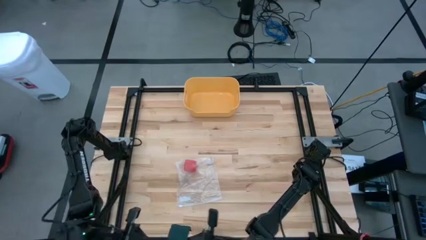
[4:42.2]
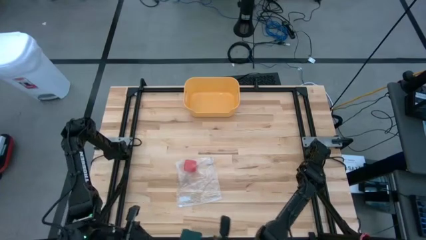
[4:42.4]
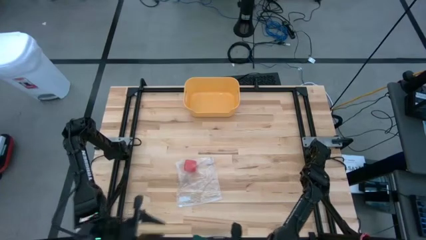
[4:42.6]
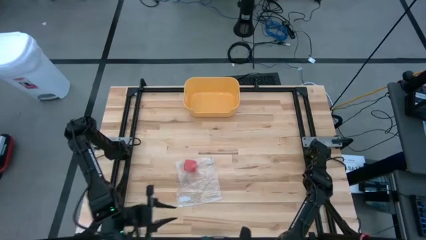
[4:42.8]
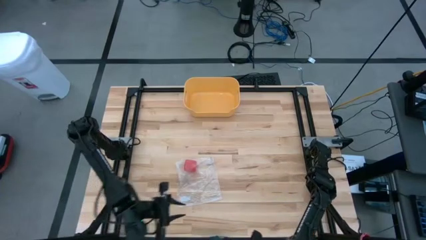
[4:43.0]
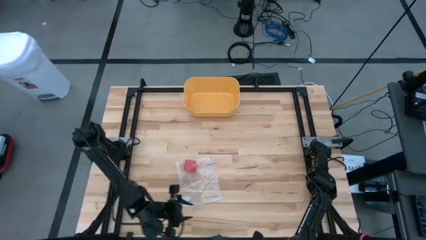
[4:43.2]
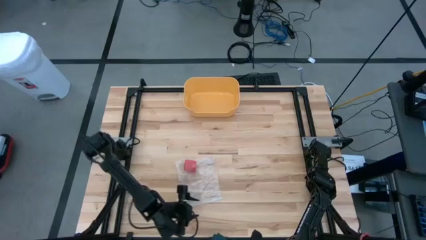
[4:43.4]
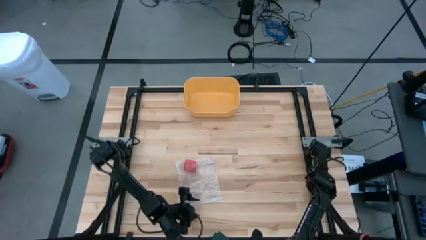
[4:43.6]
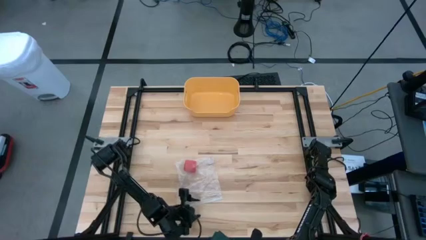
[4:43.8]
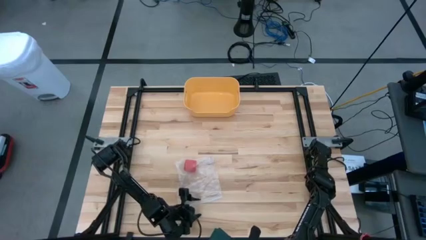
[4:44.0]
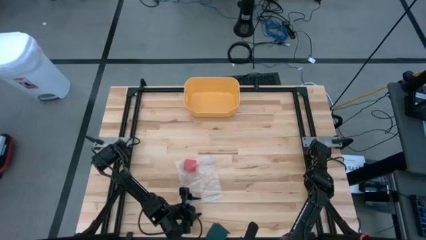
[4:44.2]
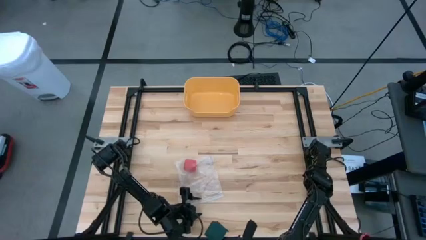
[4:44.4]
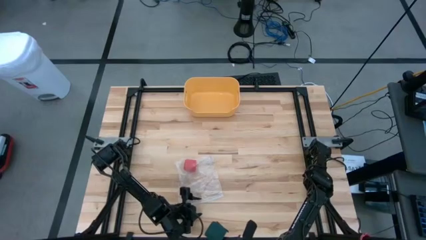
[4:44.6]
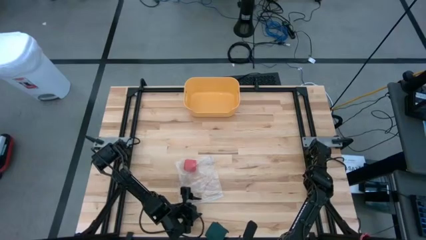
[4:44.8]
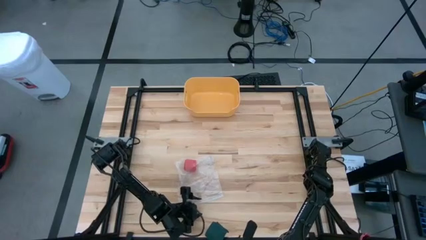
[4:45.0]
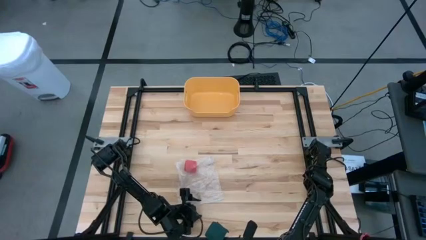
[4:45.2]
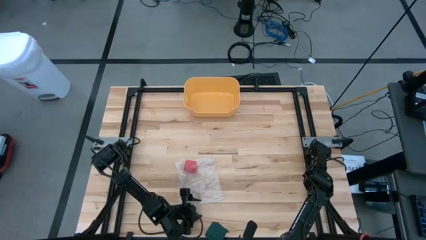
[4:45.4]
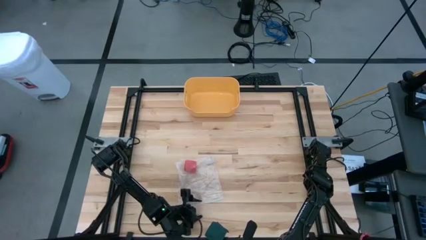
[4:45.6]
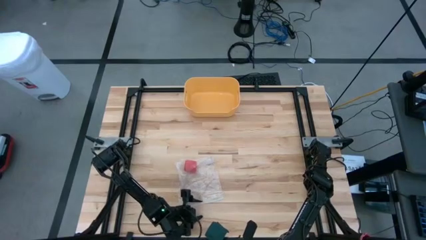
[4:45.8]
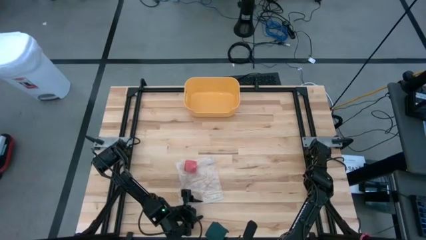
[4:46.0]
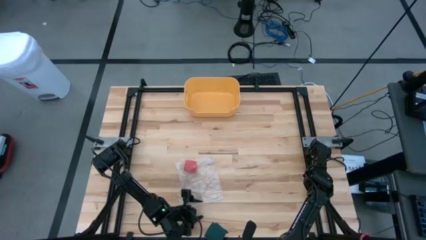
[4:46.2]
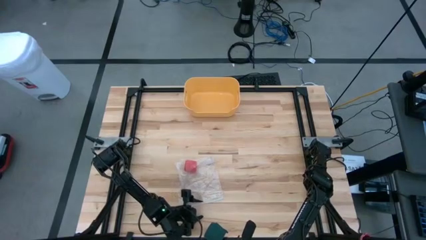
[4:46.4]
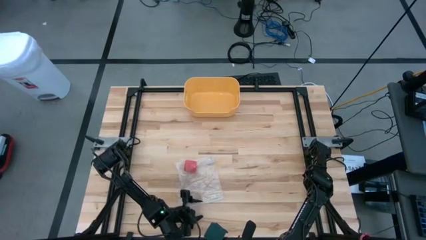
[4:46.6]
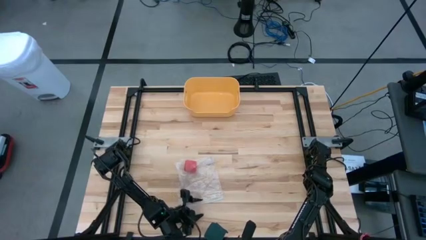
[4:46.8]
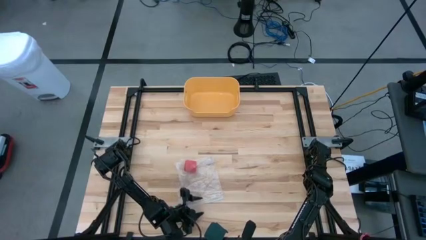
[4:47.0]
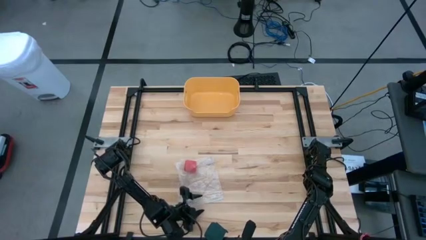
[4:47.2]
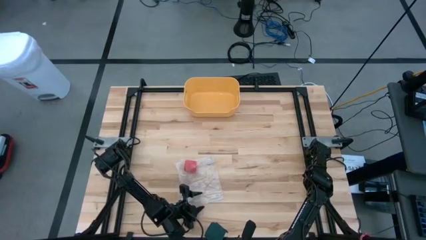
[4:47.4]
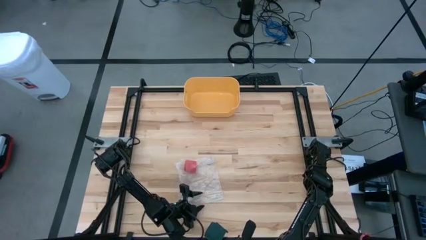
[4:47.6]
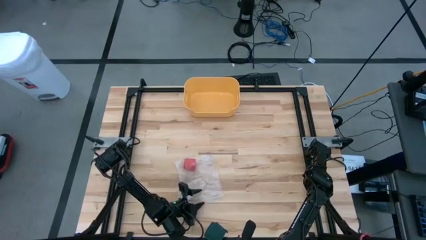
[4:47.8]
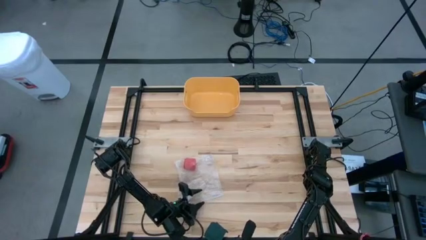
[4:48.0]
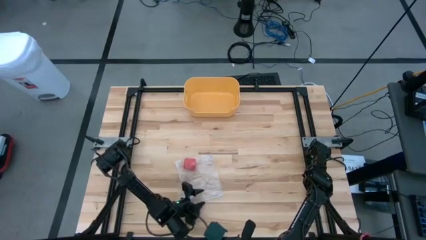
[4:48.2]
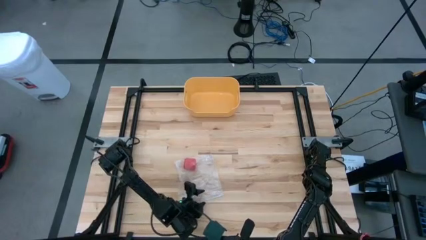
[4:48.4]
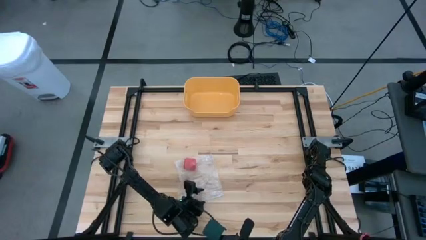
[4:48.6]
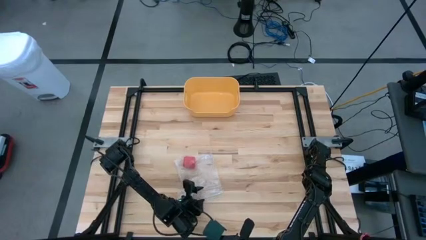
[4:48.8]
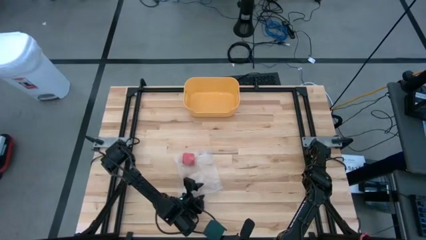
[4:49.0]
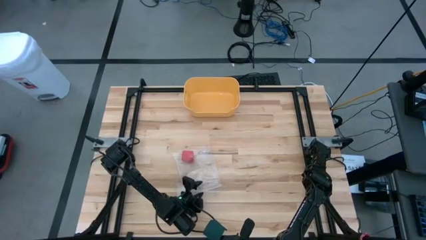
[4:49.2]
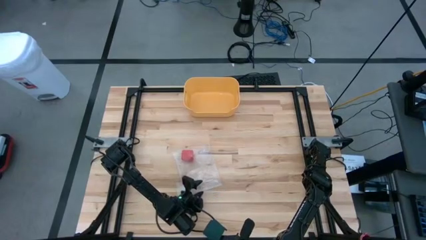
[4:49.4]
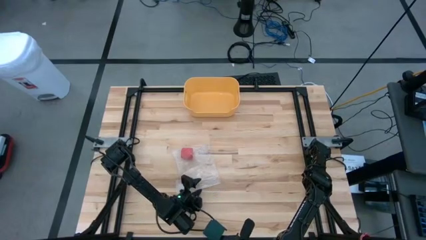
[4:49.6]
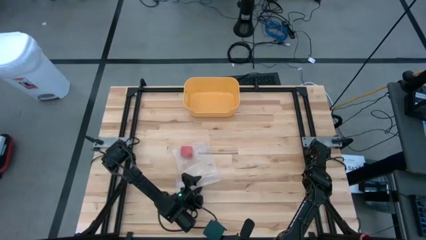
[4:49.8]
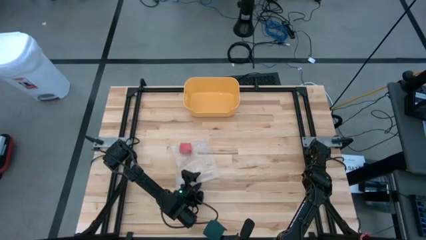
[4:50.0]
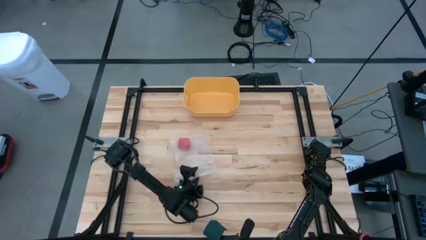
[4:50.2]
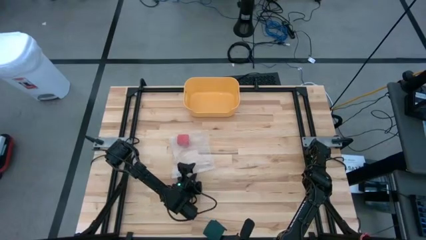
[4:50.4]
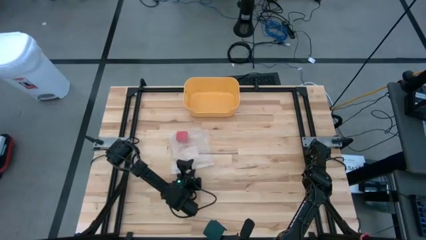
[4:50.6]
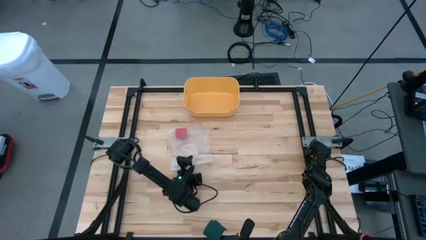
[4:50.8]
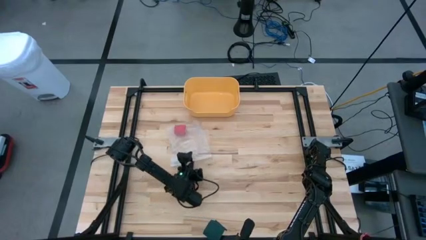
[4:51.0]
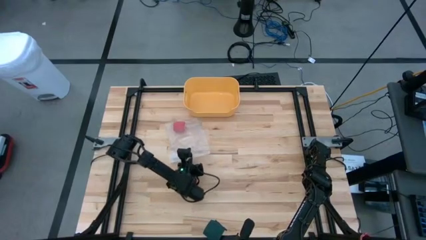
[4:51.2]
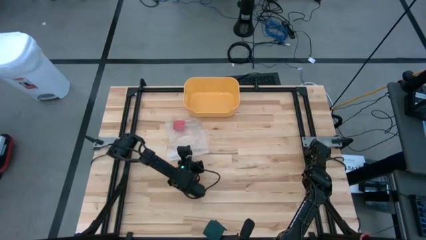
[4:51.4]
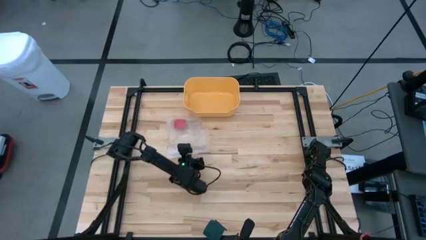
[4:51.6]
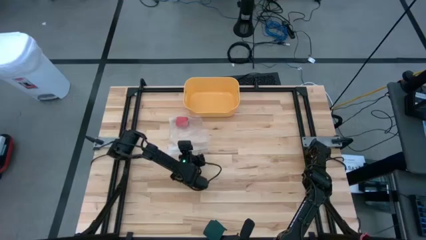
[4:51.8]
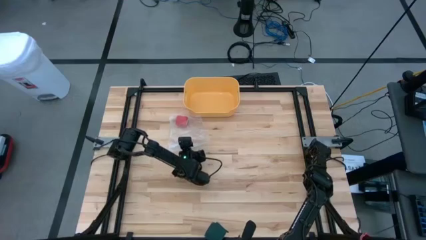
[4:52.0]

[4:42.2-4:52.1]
Task: Roll bandage
Put the rolled green bandage into the transparent zip bag

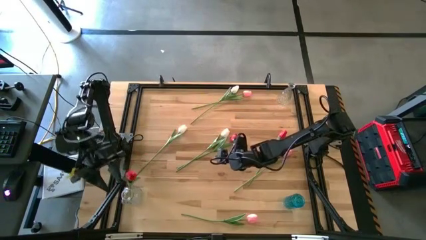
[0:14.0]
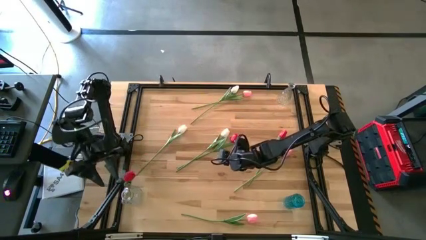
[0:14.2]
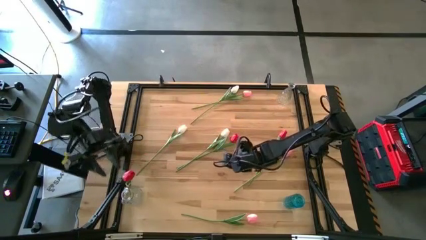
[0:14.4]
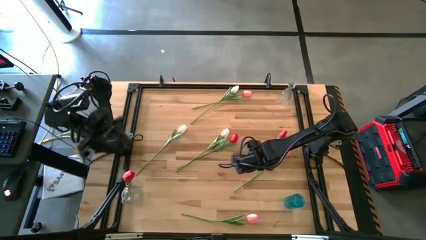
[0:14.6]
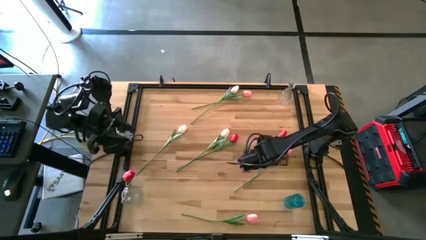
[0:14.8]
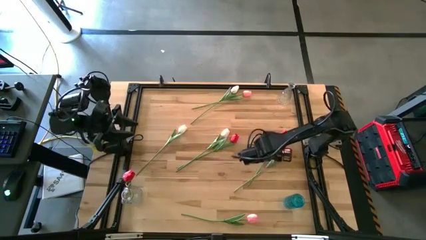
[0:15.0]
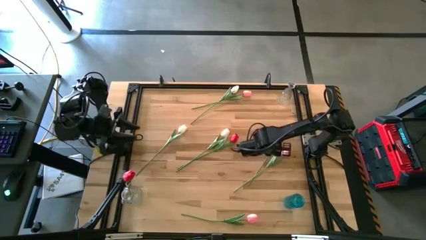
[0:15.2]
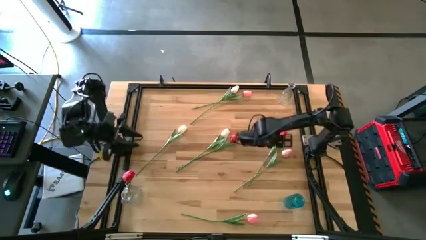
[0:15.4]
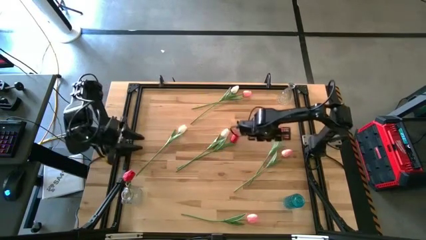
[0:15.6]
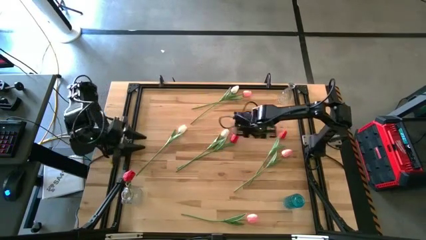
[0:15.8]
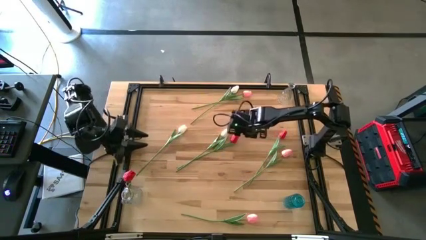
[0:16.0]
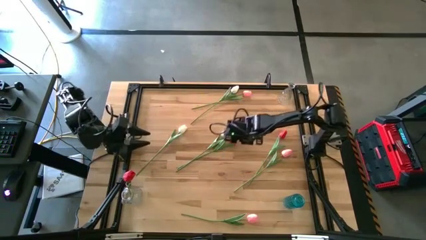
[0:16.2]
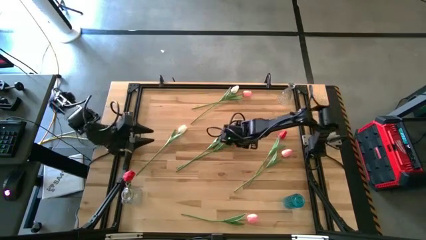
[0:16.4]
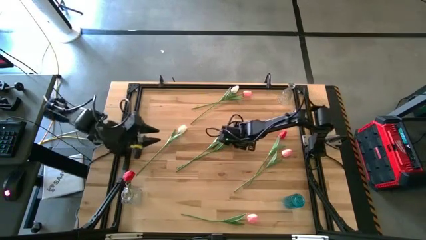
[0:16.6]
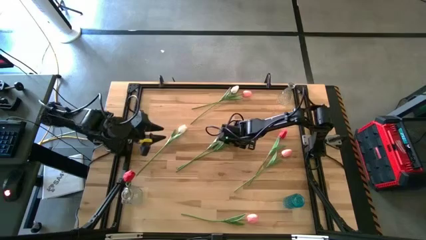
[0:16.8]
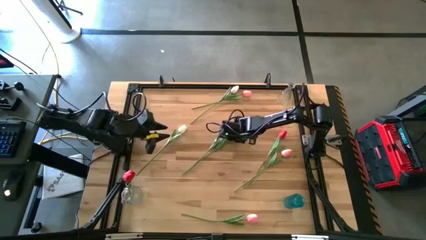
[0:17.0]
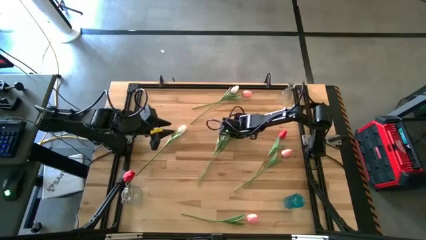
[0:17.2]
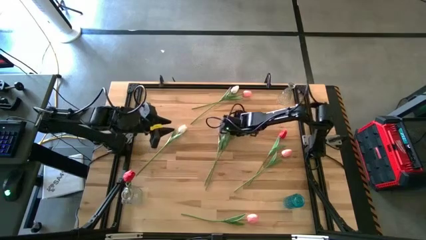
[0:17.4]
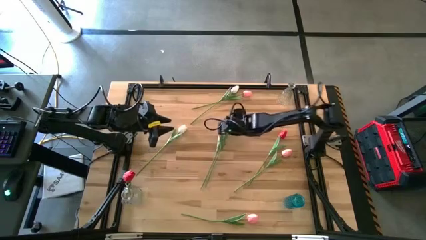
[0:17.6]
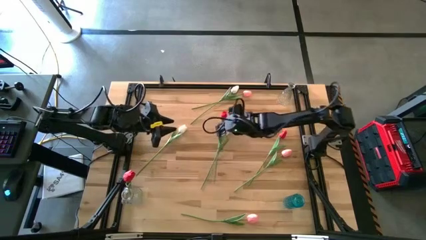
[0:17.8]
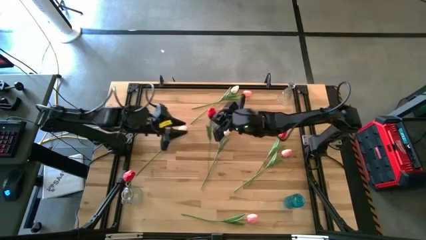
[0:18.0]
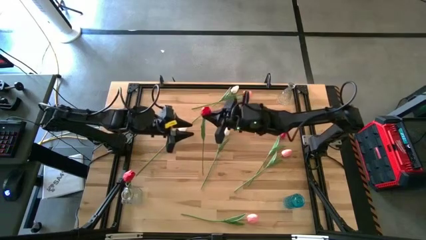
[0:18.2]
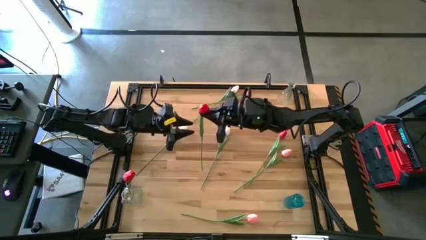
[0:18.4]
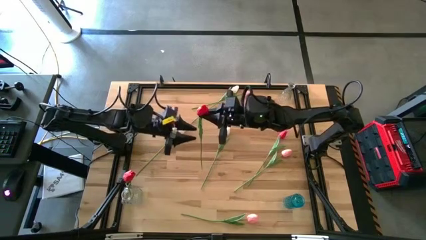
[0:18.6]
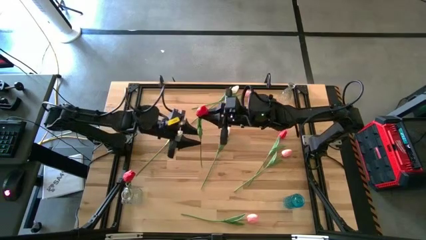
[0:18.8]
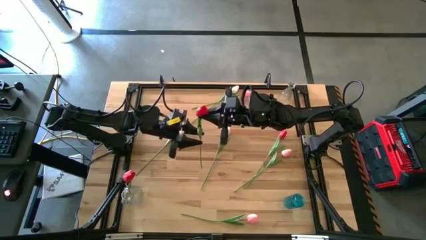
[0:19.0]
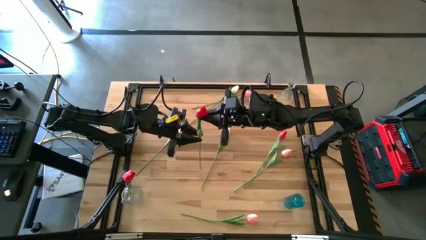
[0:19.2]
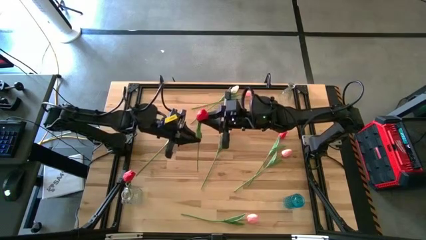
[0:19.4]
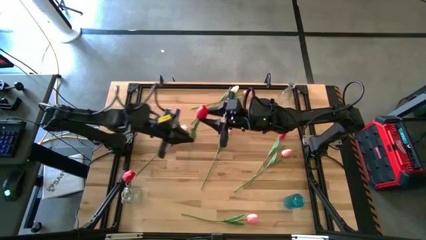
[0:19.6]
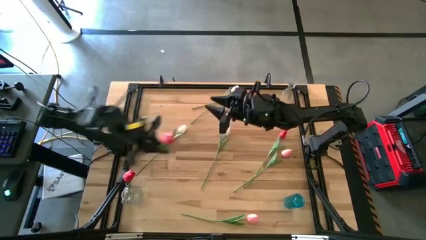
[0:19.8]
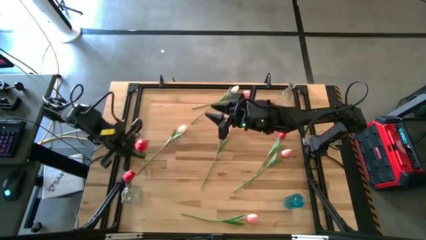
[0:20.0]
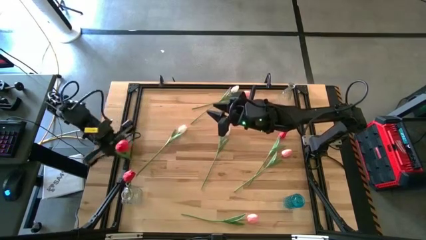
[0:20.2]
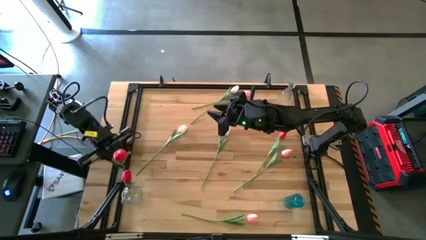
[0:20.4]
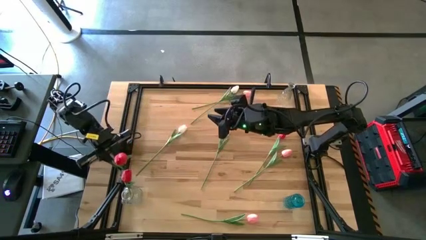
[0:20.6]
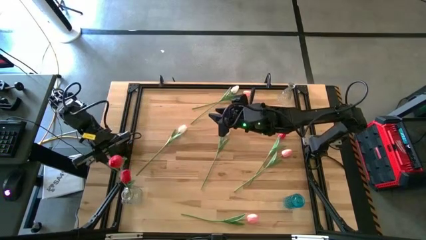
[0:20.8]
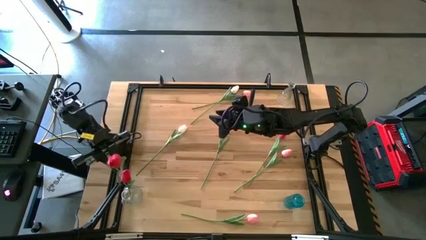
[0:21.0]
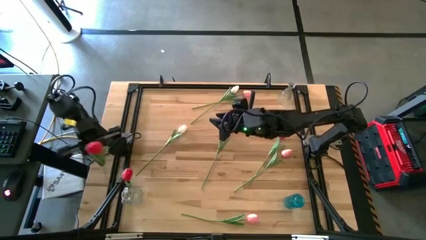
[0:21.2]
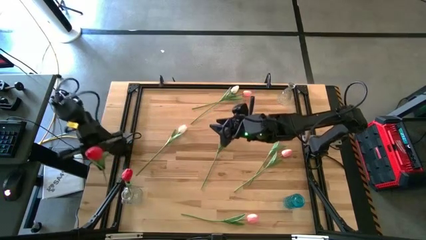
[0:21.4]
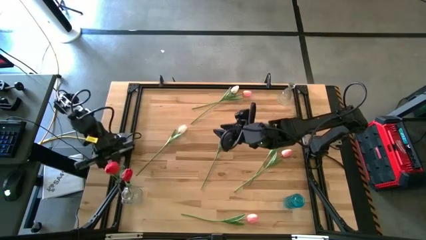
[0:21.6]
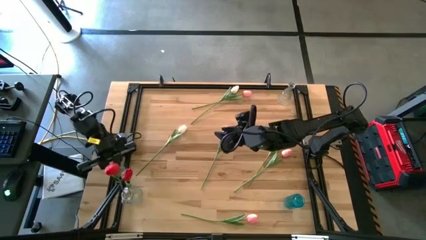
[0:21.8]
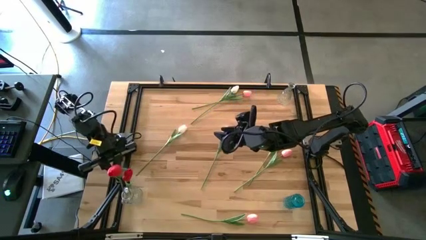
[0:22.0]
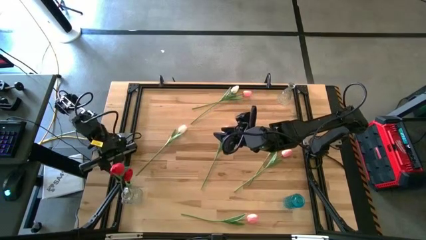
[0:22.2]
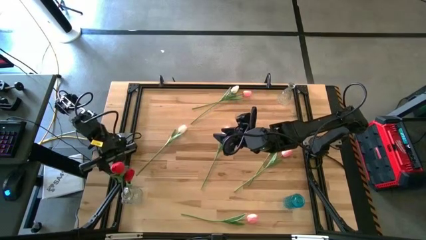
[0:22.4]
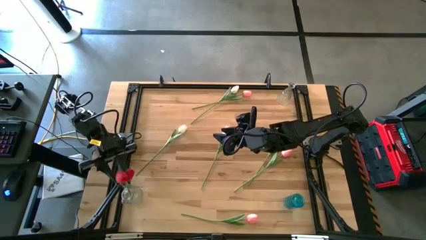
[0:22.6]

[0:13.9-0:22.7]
Task: Sort flowers into vase by color
Put the middle left red tulip in the bottom transparent vase
